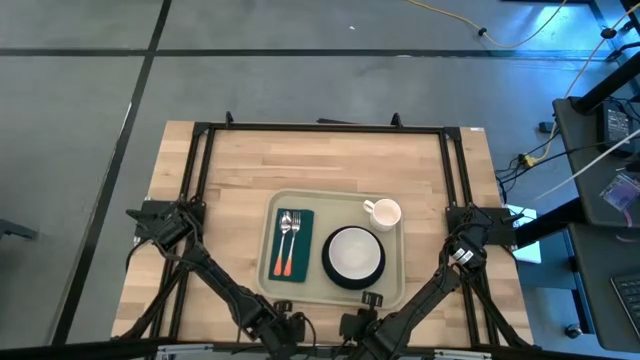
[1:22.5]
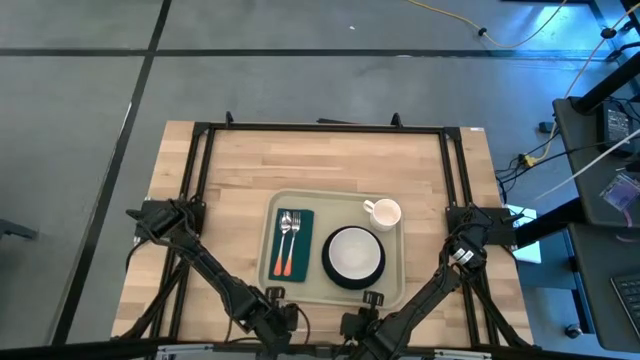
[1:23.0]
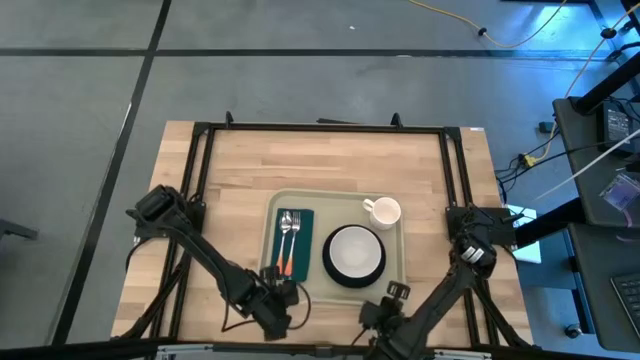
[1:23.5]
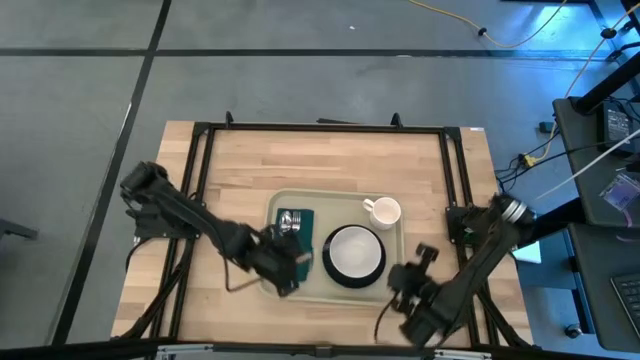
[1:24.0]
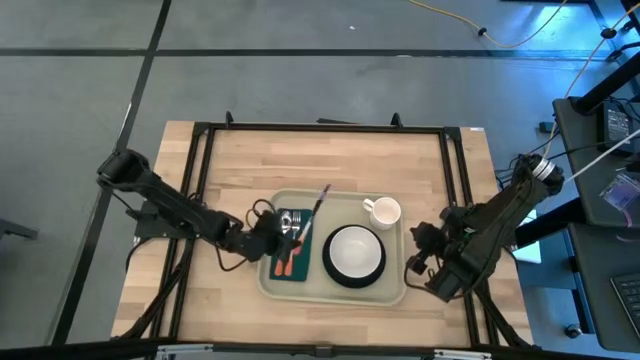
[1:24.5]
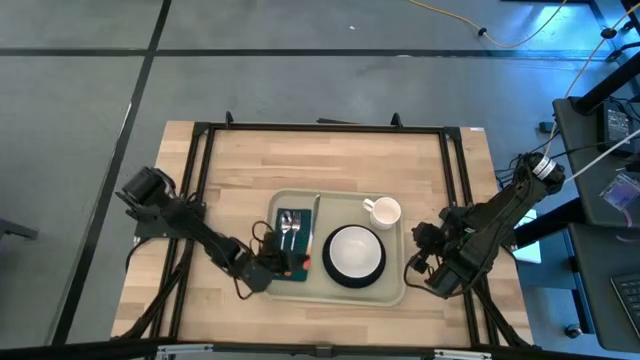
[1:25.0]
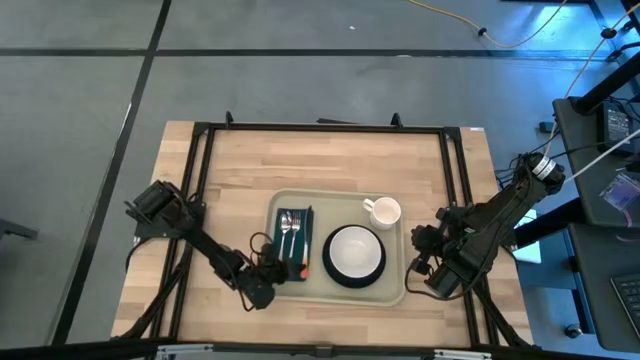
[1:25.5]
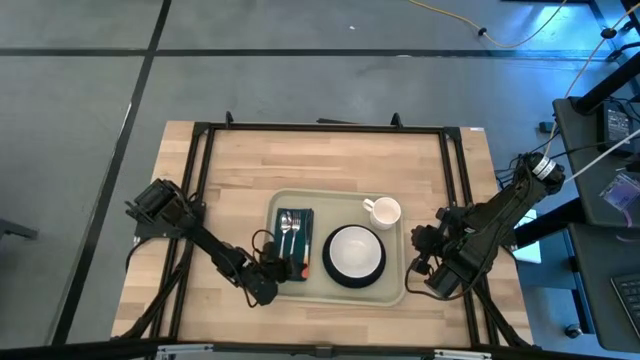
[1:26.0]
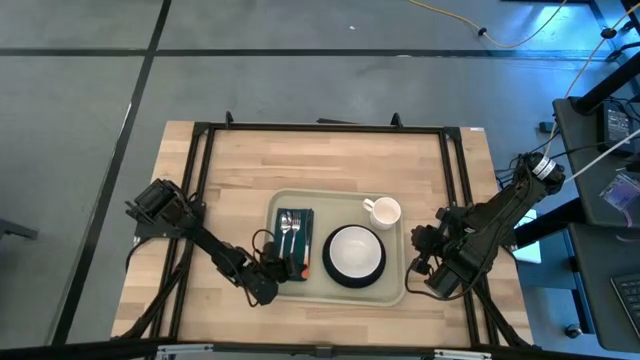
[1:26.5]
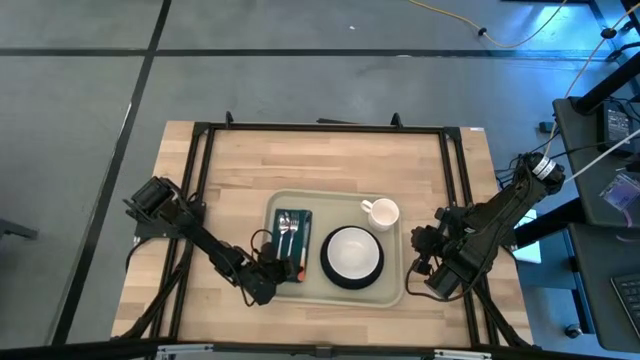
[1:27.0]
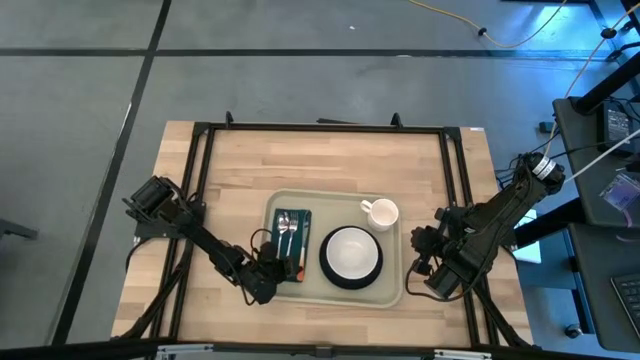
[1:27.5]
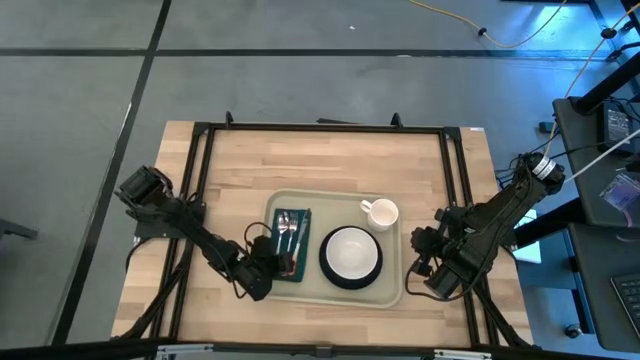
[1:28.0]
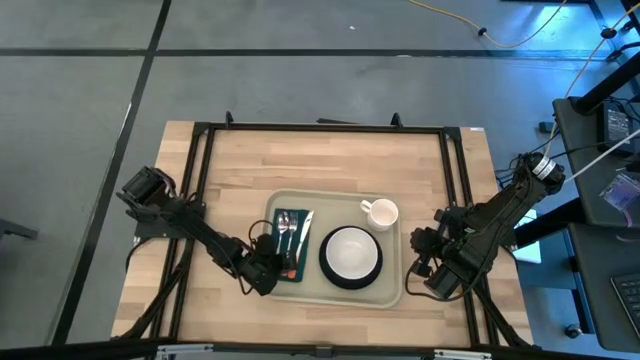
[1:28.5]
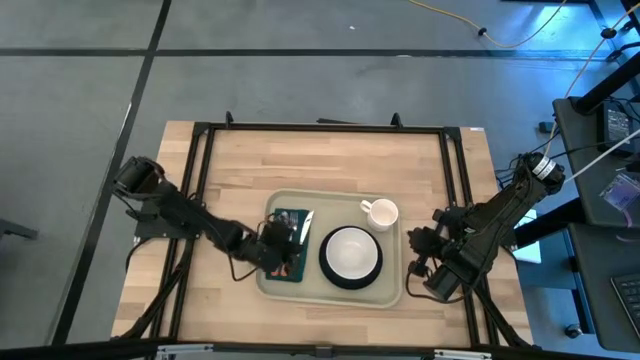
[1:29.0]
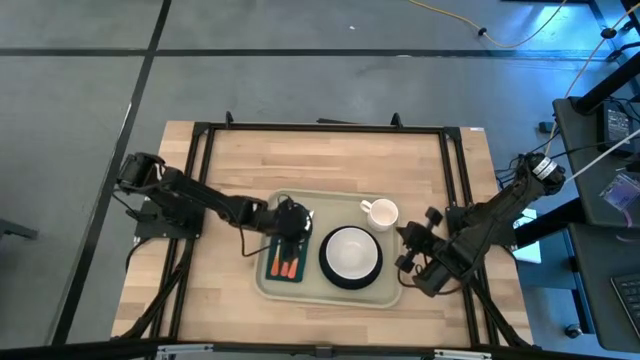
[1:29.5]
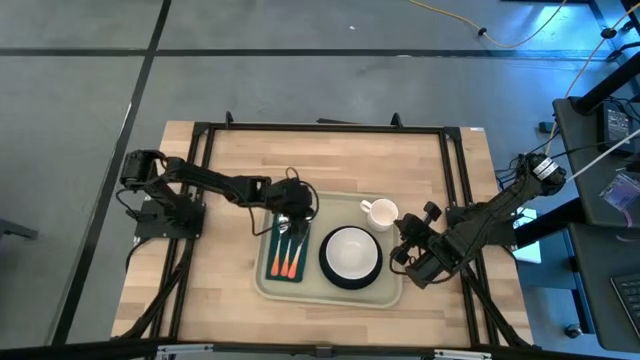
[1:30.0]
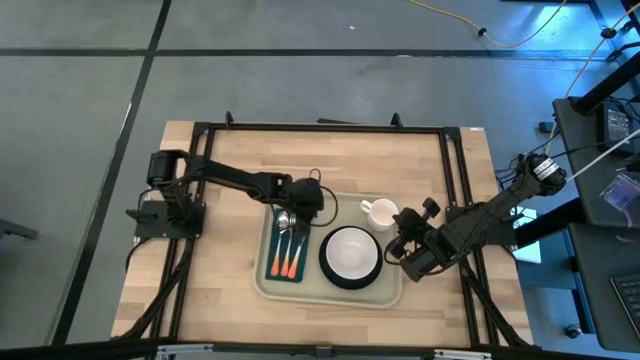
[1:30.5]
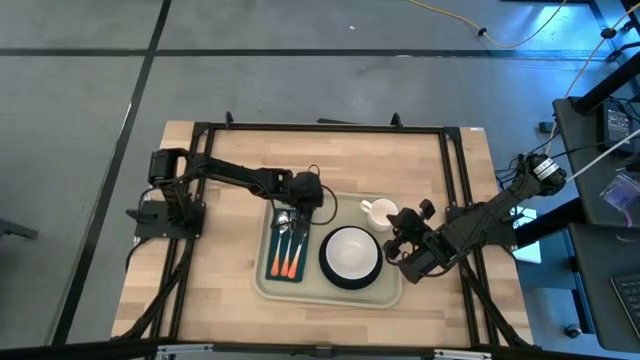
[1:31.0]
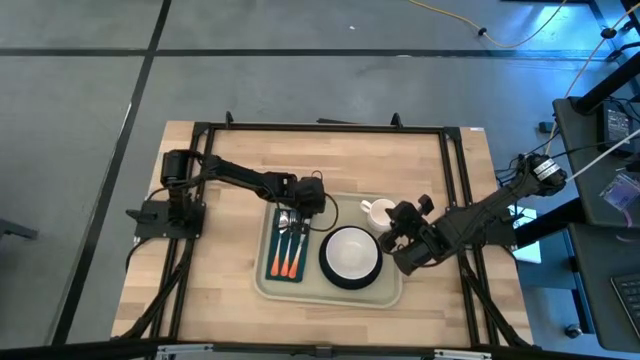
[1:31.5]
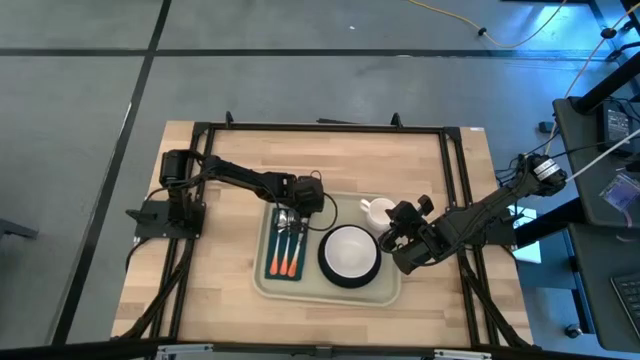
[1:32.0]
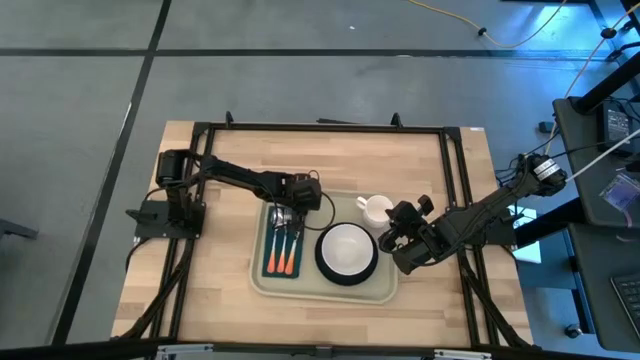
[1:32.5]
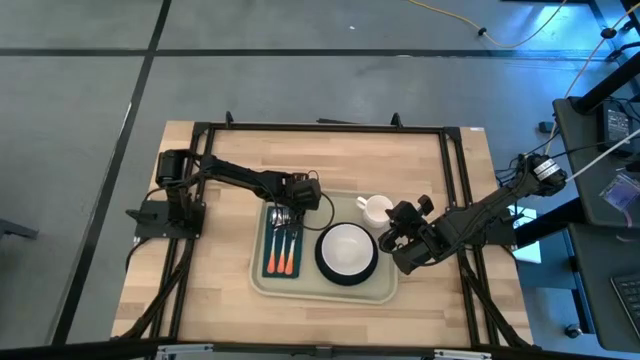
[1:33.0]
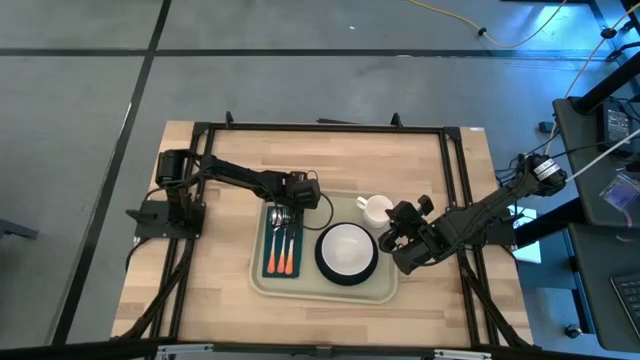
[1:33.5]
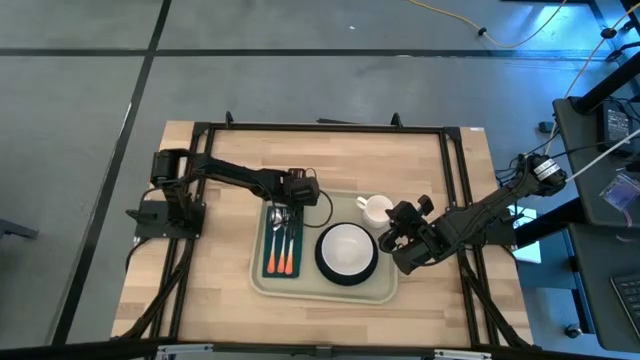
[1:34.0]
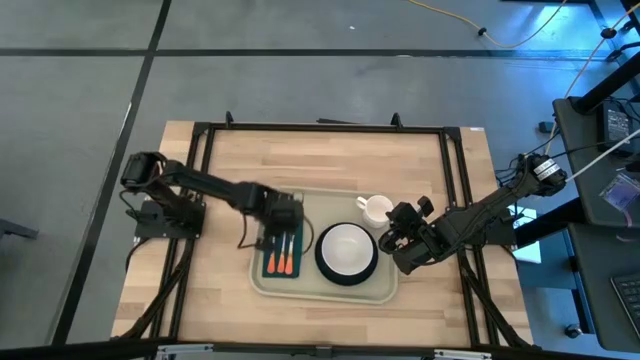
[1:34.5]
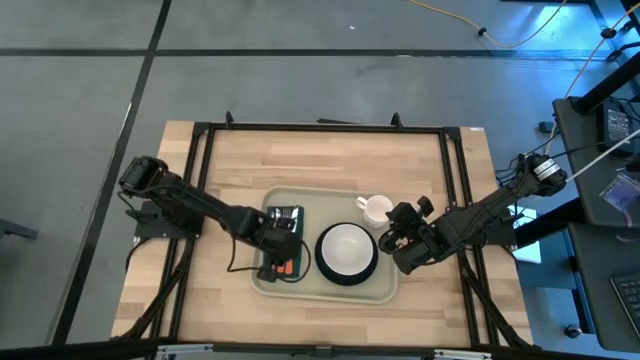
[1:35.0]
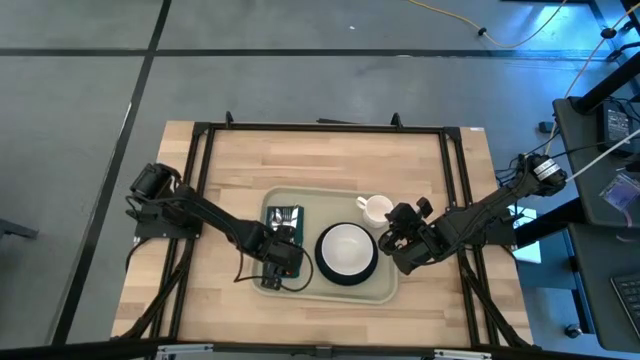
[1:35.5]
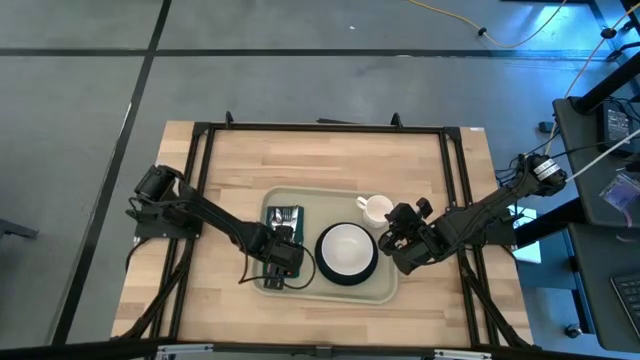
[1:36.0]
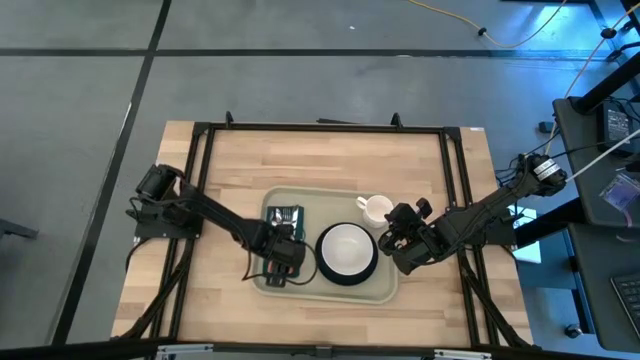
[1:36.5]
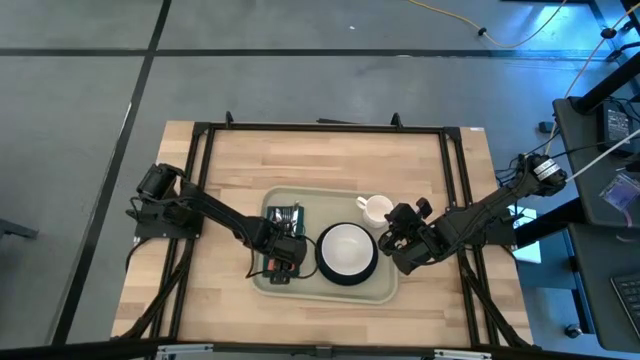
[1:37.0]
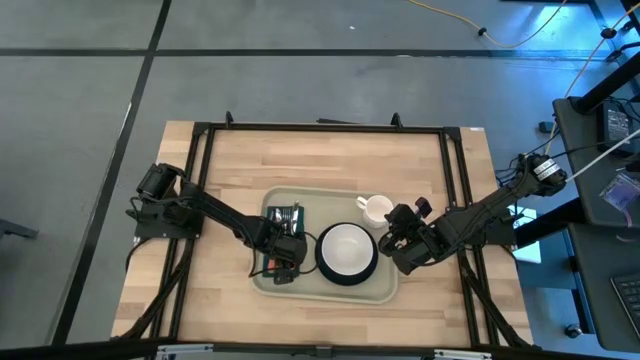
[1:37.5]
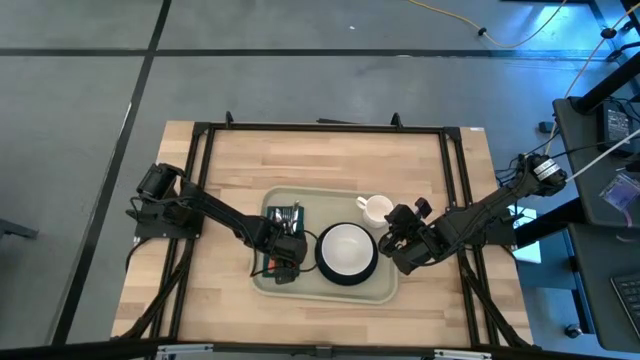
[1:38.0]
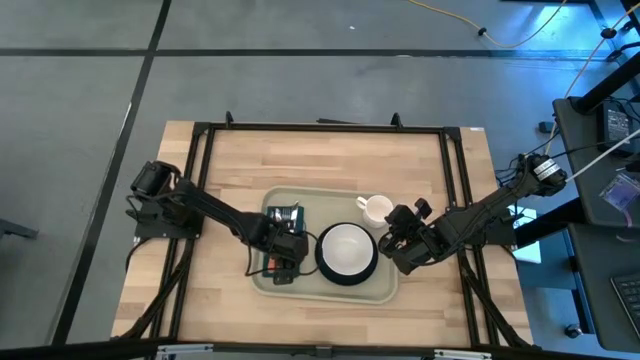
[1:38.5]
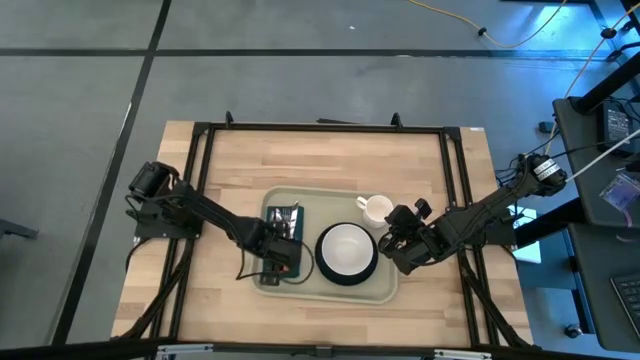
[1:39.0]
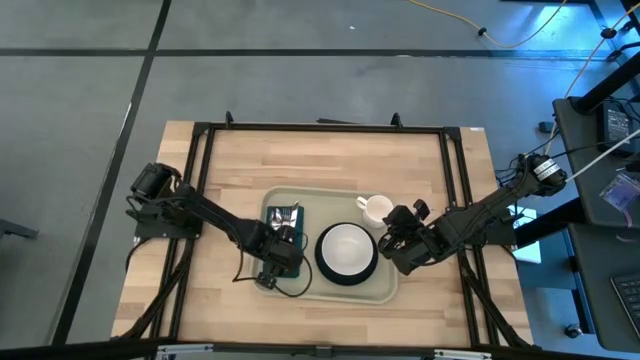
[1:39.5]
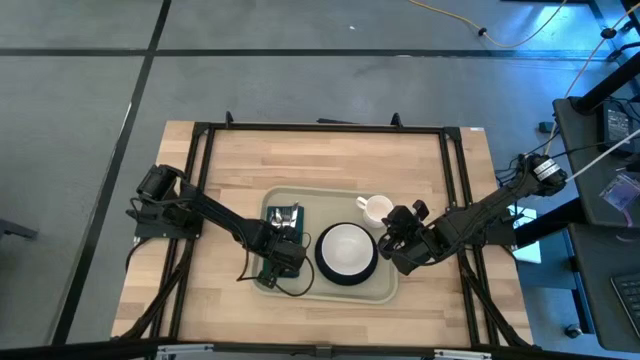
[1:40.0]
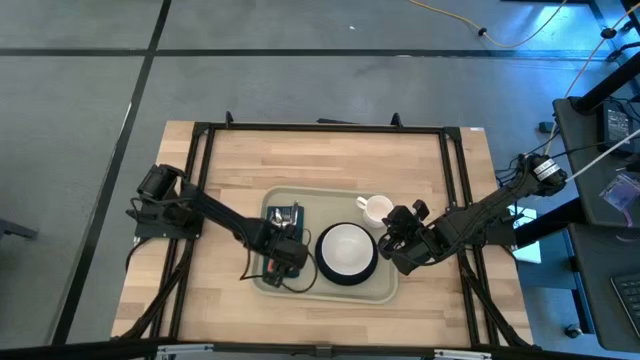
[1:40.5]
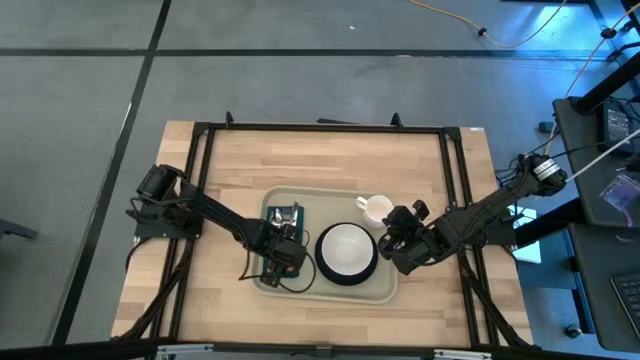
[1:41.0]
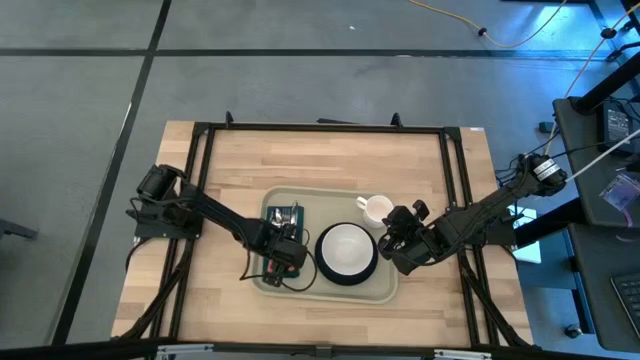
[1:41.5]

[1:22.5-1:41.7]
Task: Set up tray
Put the orange knife on the green napkin

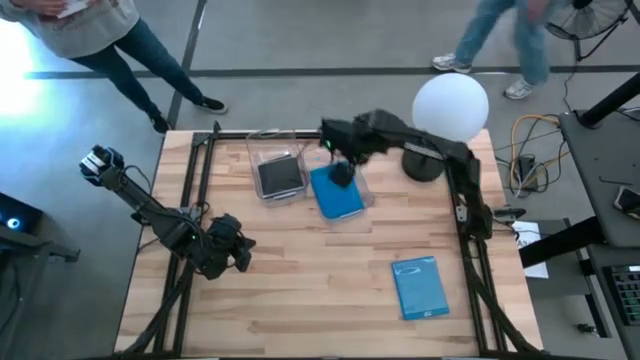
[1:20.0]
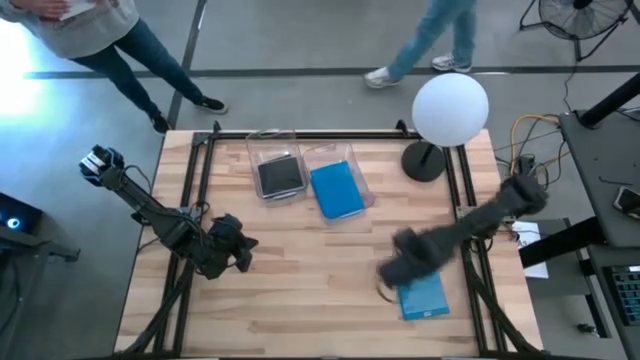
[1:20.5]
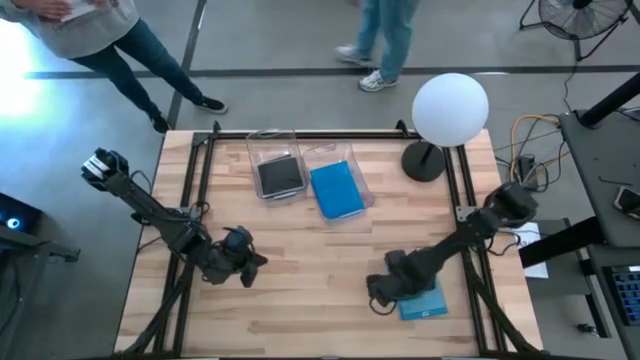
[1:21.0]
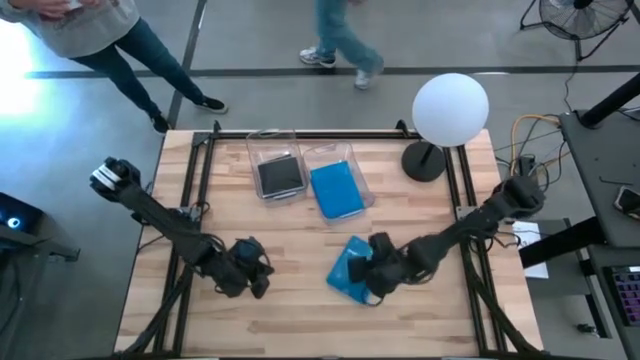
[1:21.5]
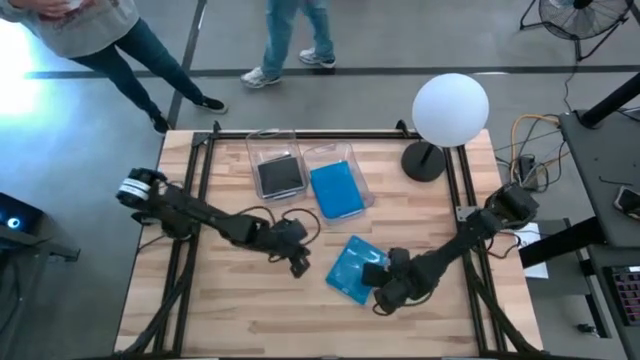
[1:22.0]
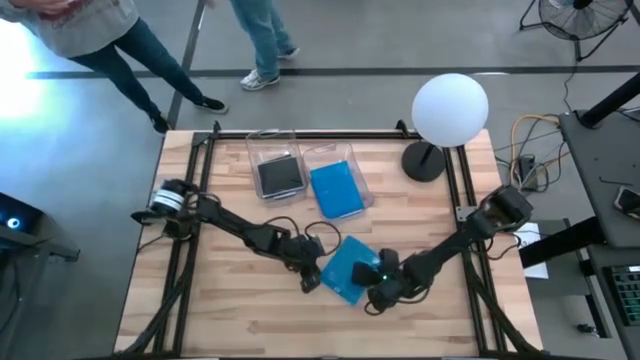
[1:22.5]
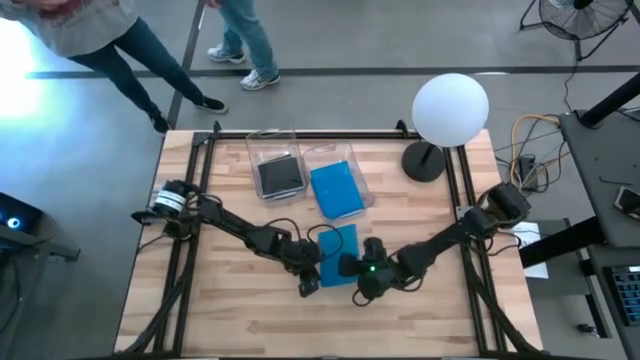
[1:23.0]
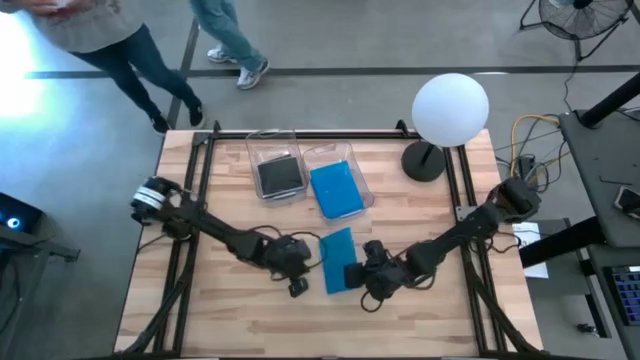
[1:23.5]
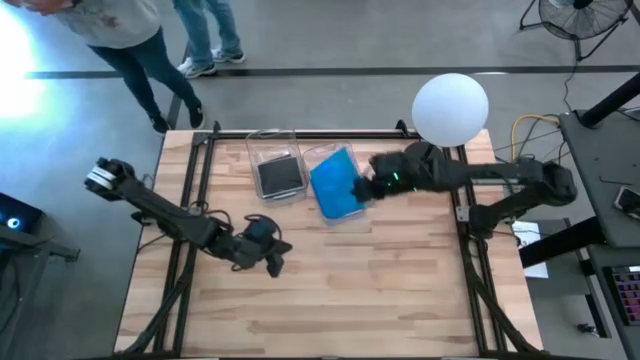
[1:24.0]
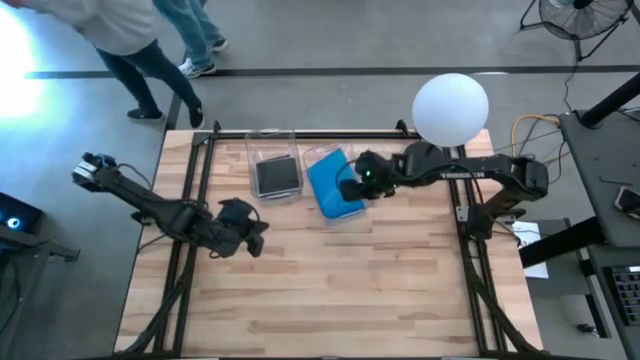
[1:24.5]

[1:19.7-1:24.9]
Task: Pick & place jewel cases by type
Put the blue CD case into the right transparent bin
